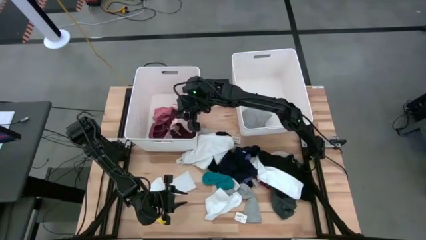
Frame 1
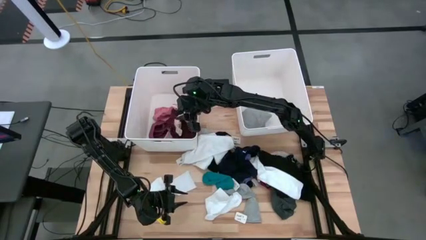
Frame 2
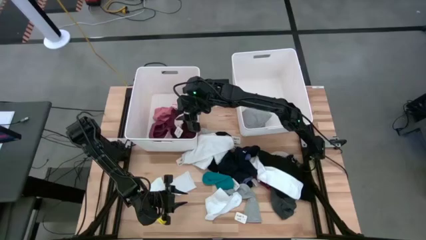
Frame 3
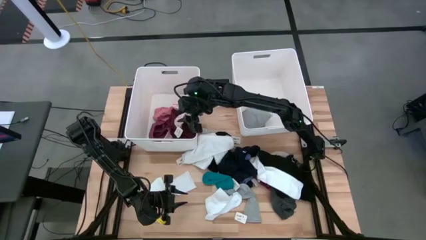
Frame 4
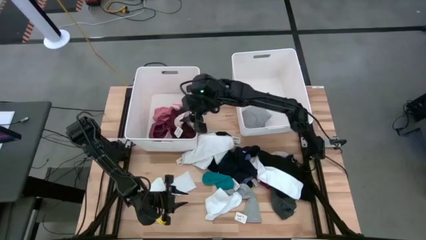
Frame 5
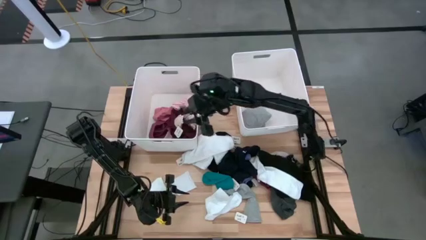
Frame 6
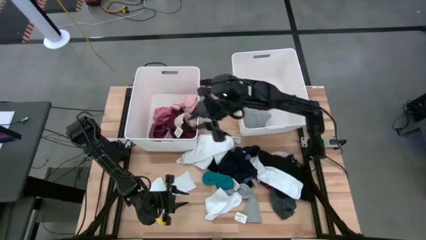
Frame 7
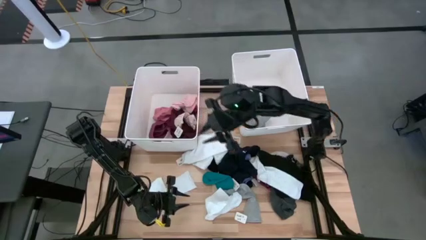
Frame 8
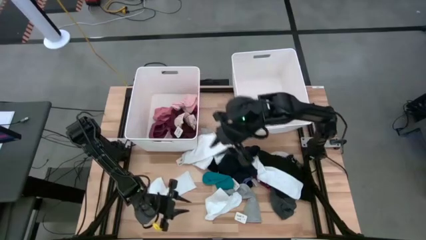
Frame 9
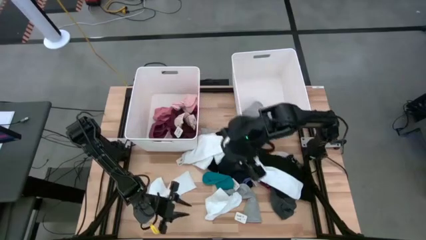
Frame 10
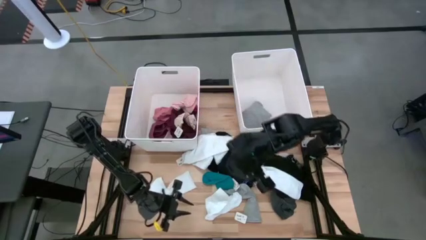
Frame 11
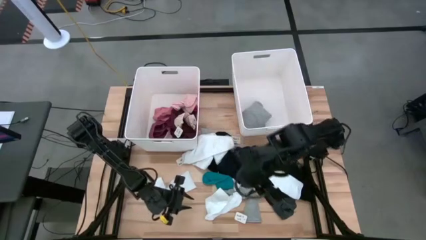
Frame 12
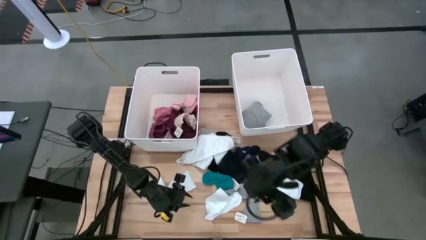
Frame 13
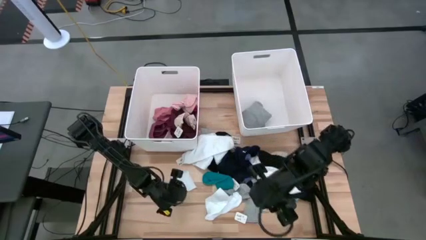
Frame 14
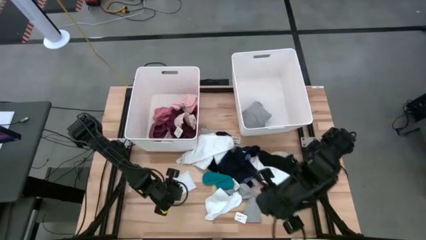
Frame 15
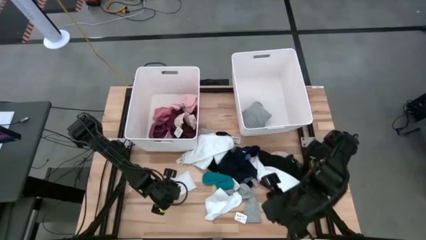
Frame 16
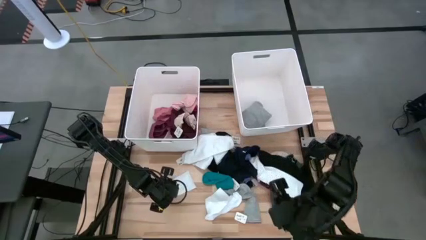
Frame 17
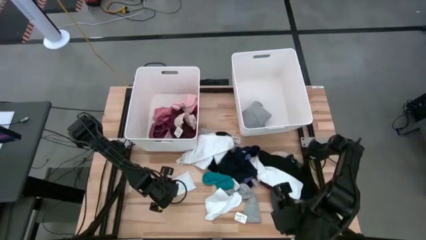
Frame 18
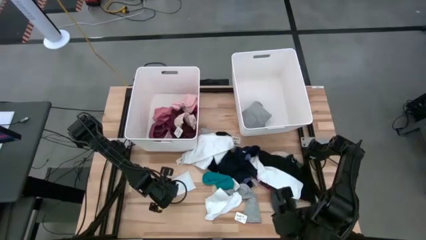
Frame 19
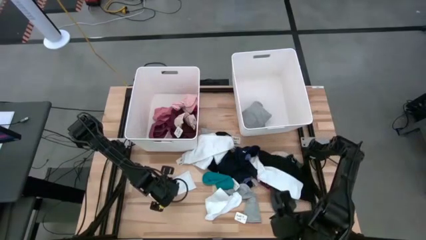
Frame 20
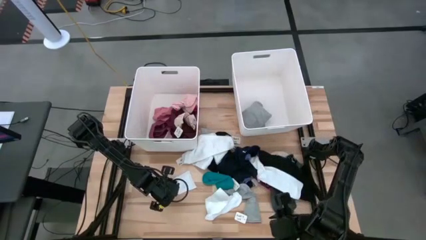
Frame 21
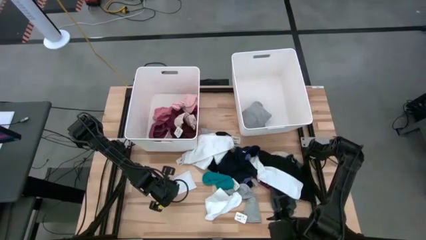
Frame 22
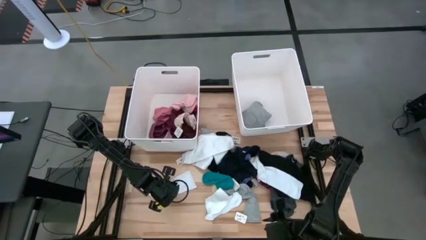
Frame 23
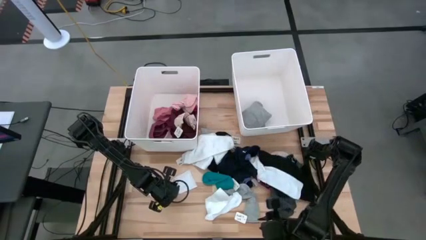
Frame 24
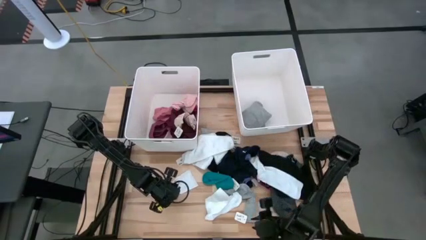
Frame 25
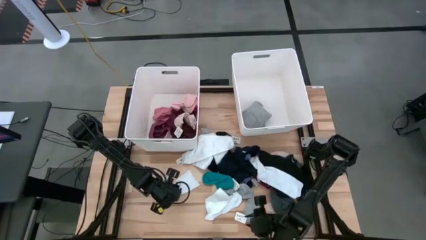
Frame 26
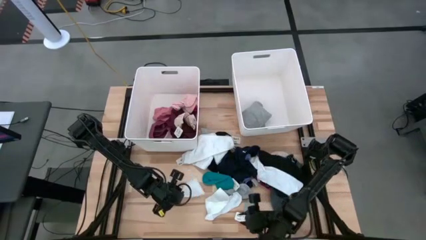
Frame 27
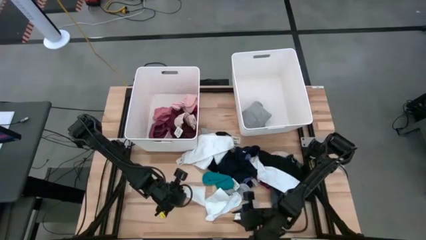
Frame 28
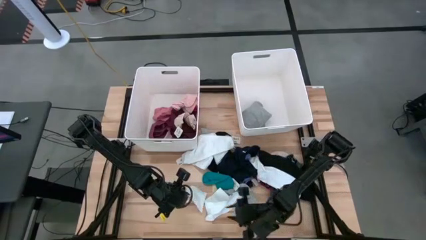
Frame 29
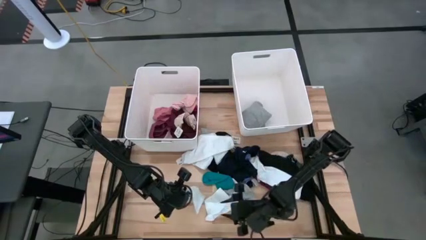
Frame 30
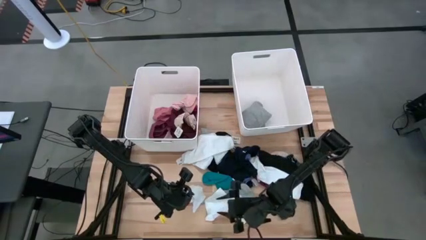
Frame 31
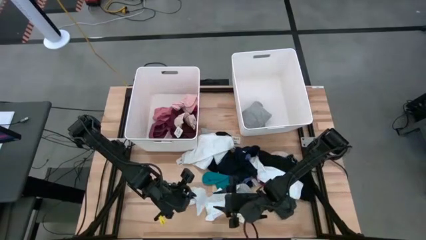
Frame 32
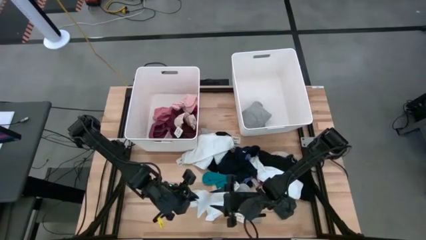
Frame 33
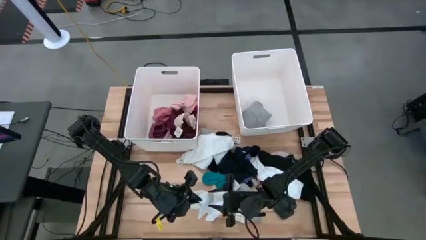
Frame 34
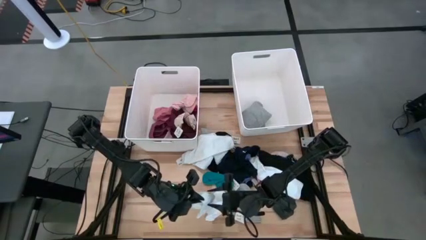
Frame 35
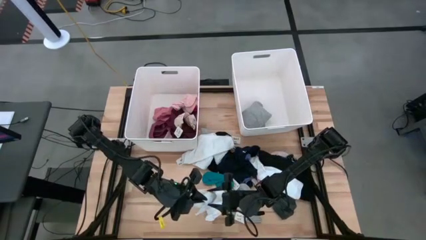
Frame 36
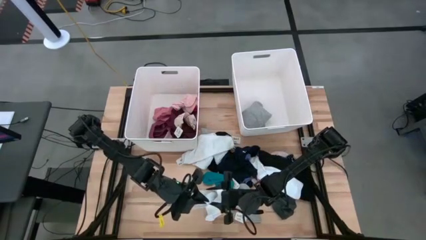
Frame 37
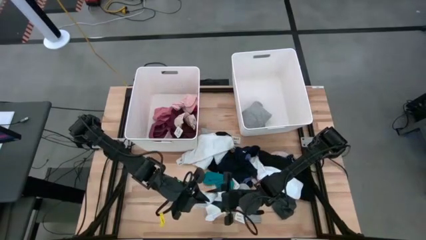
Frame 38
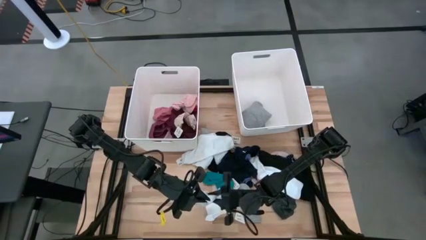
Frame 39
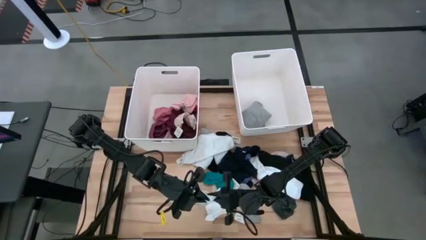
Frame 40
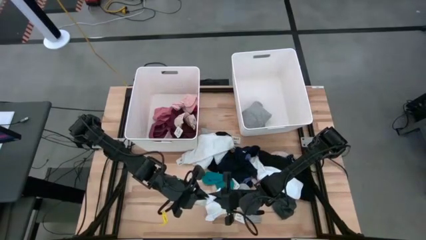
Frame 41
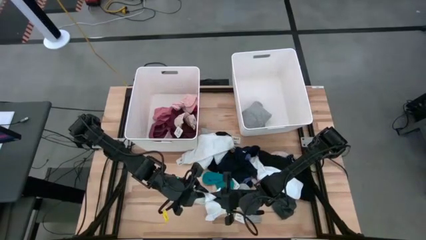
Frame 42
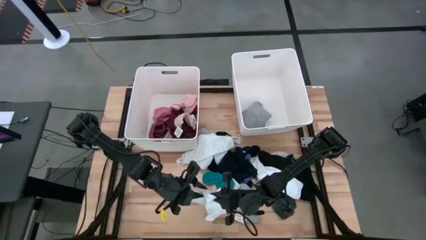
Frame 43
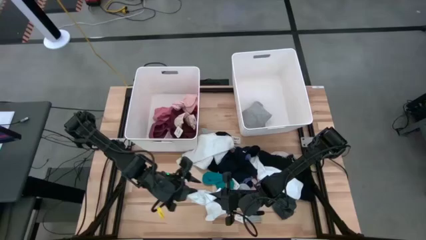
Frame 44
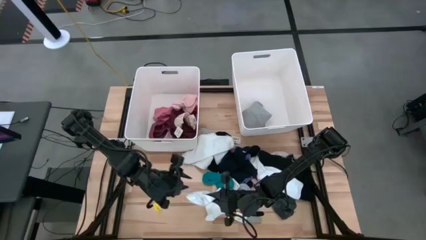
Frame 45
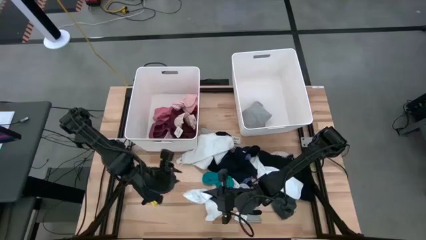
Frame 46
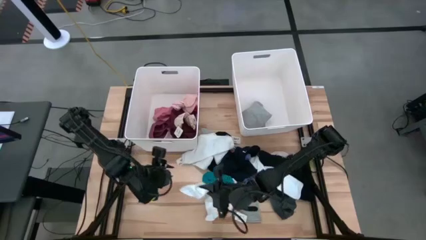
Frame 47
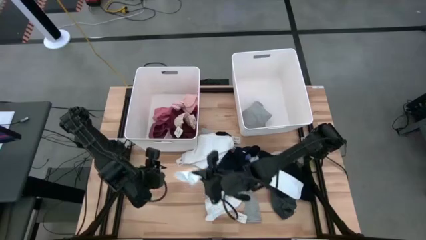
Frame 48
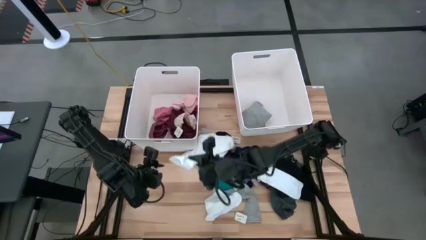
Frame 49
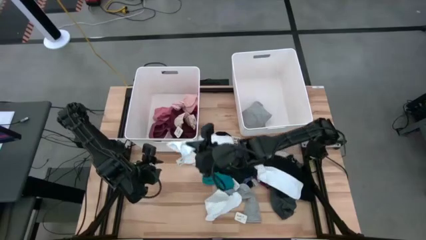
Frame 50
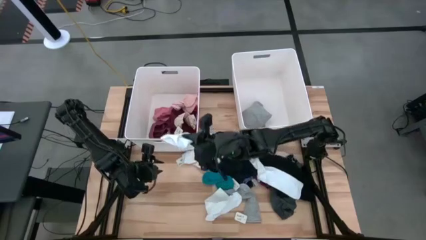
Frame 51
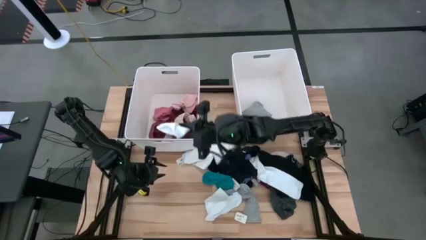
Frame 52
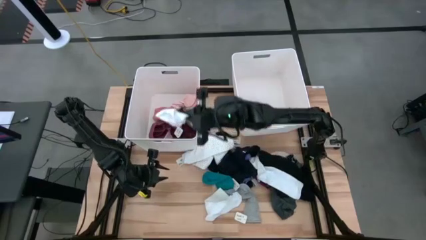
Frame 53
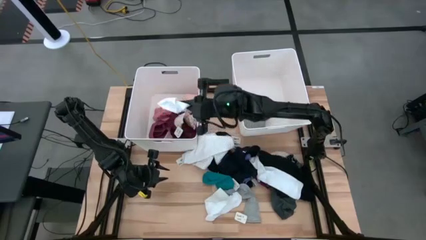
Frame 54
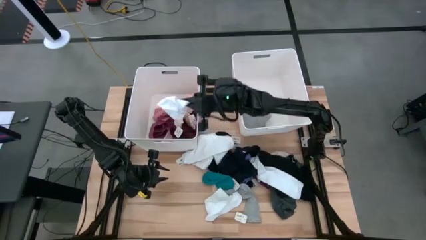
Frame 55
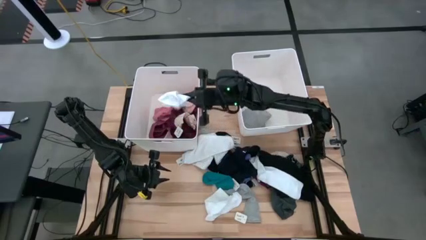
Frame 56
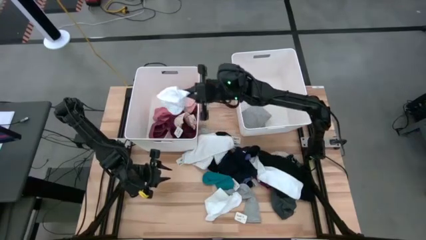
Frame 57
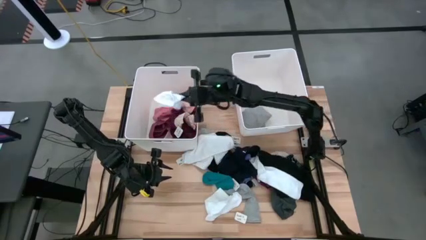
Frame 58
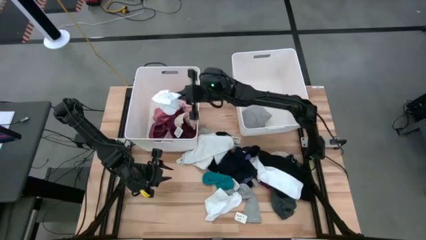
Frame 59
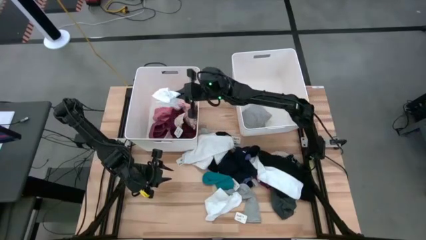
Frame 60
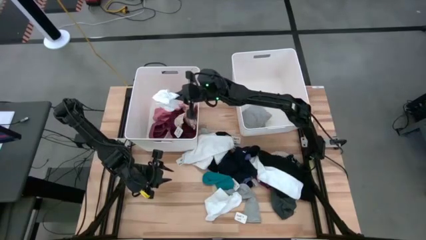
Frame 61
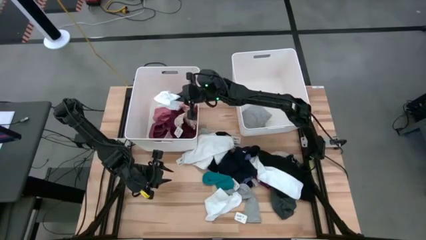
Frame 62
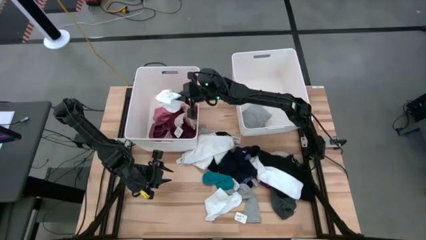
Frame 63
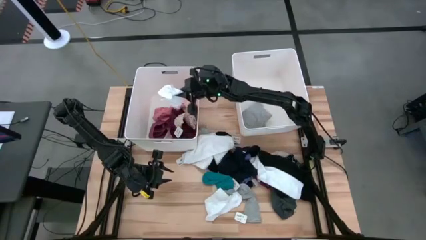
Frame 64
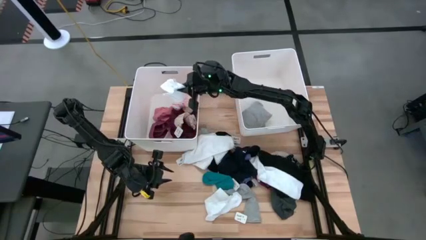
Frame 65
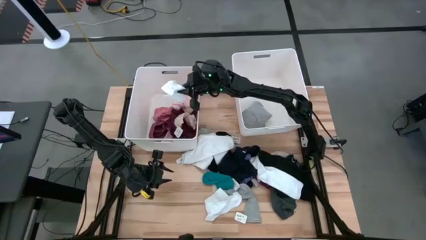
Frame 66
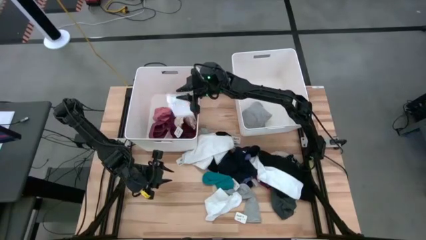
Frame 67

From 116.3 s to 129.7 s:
Task: Sort clothes
Put the white sock into the left white bin
